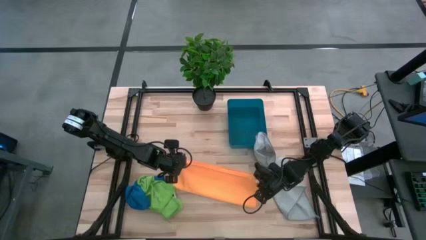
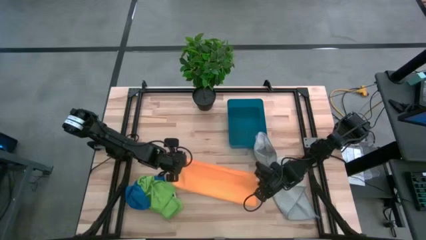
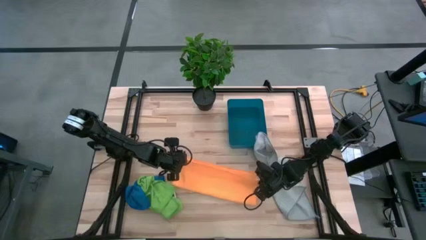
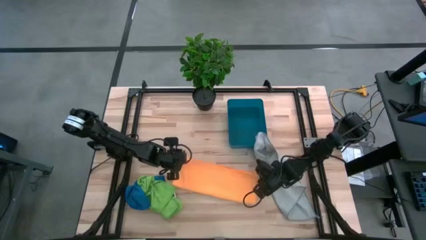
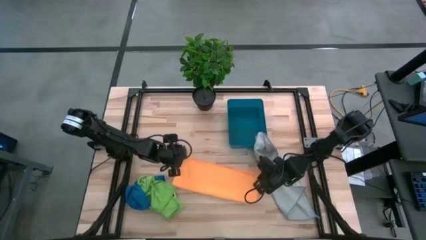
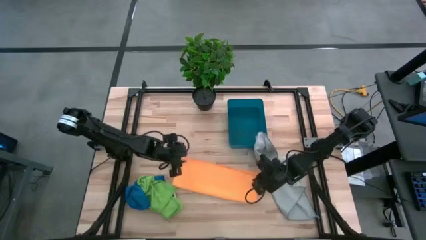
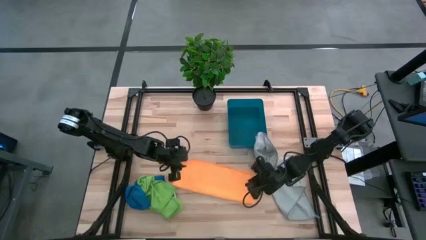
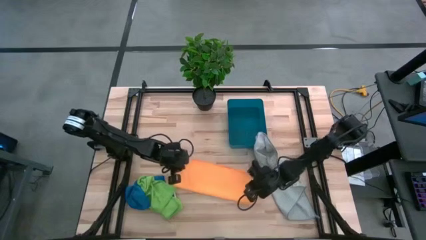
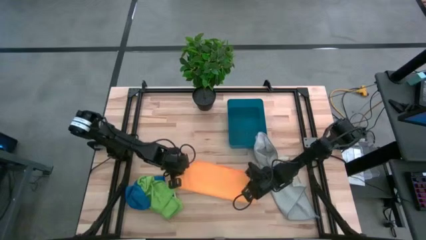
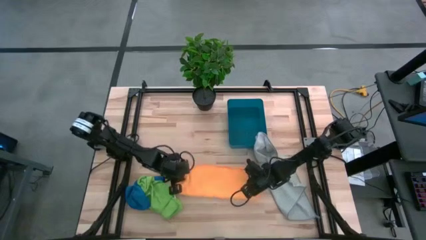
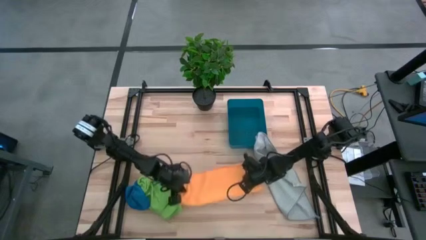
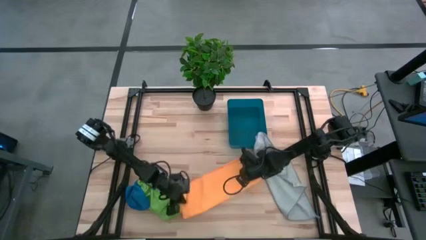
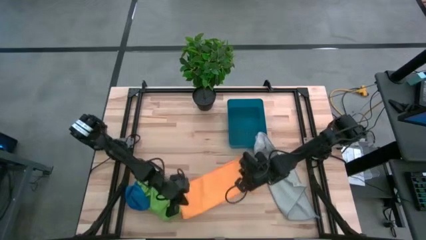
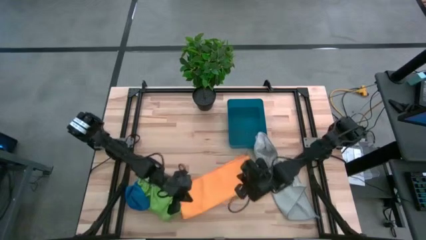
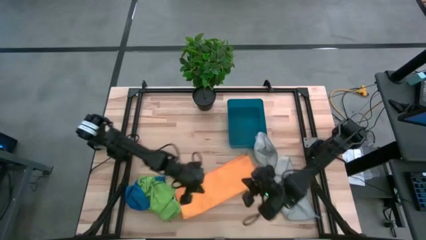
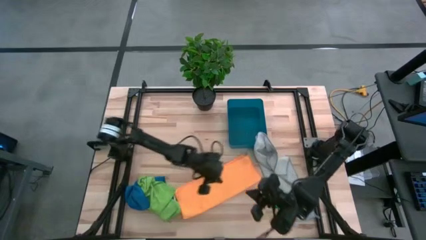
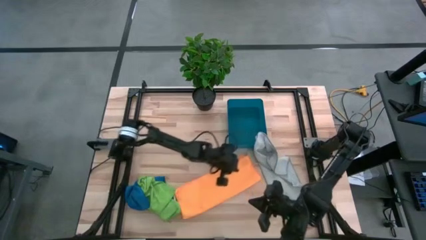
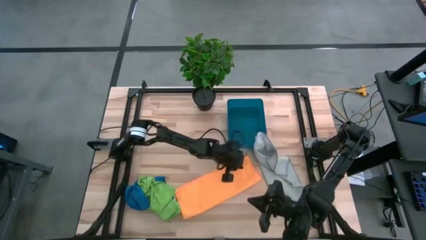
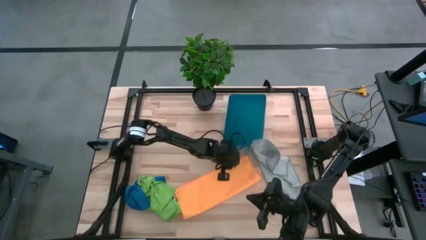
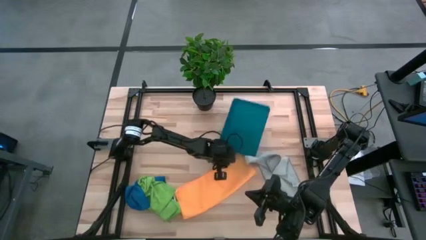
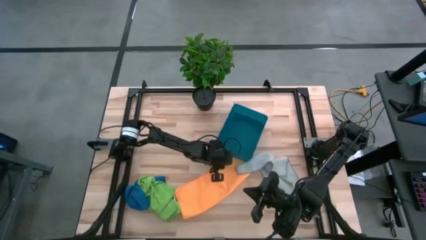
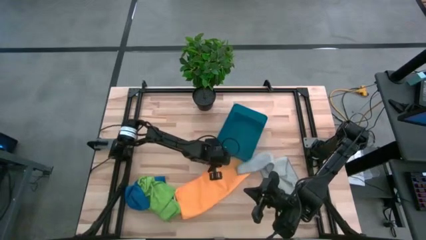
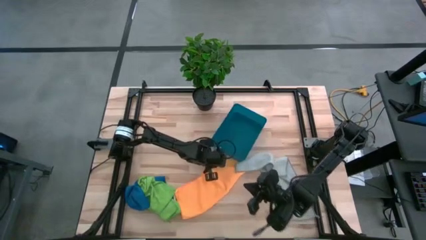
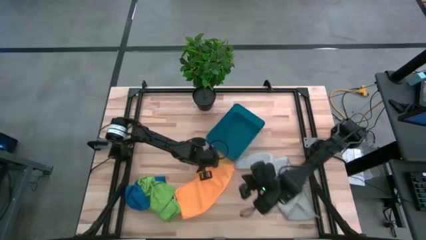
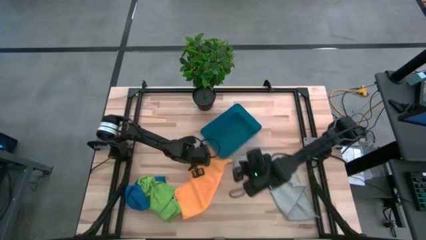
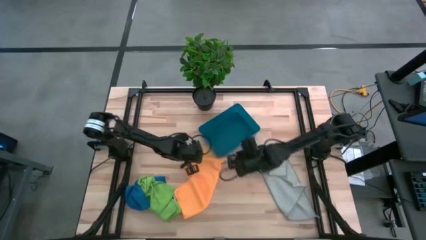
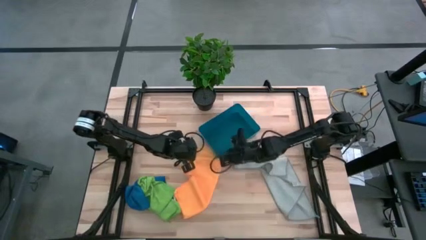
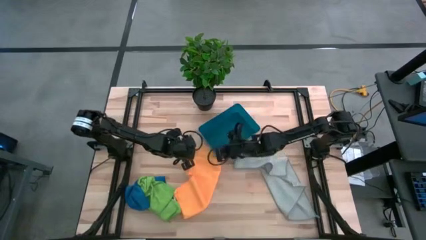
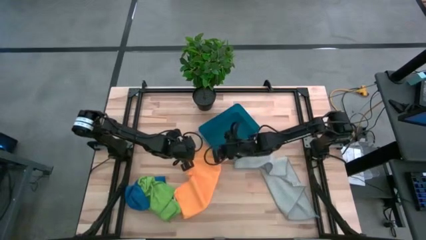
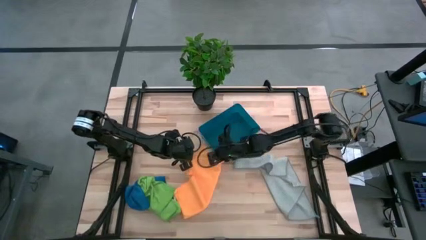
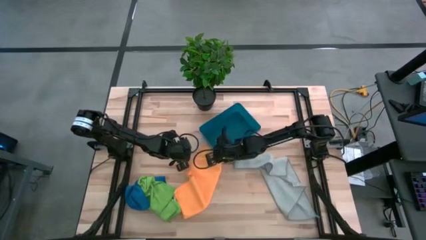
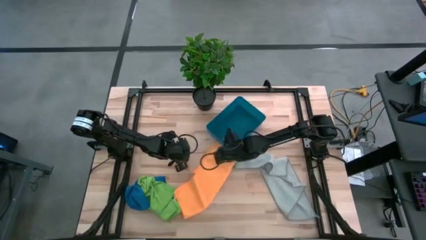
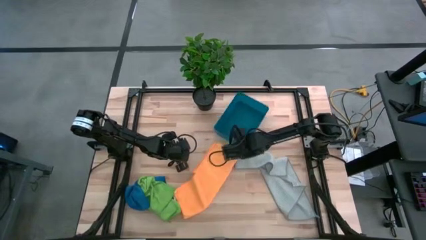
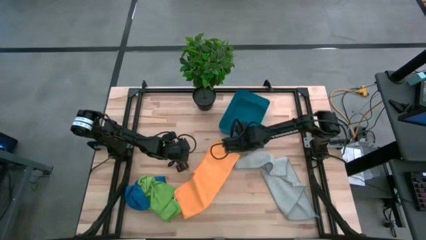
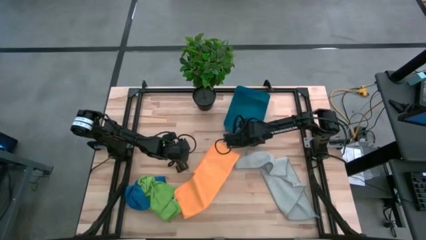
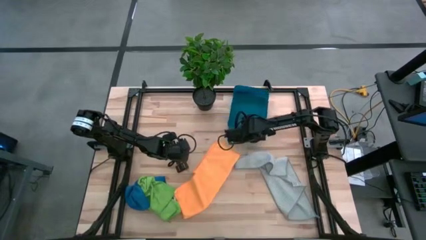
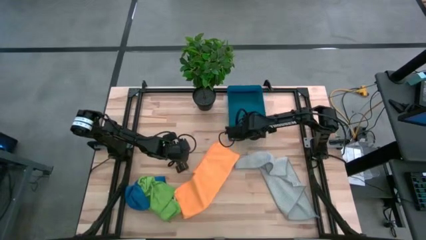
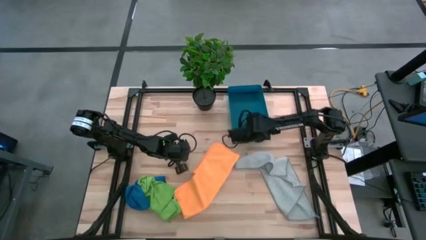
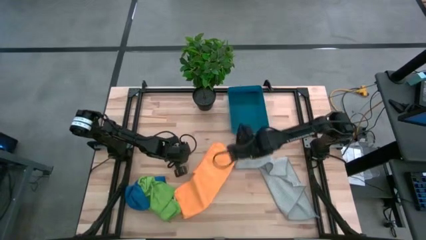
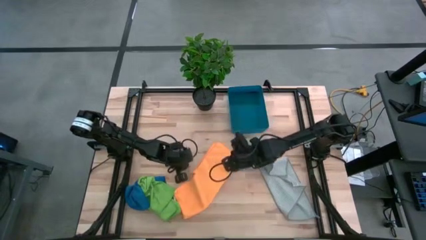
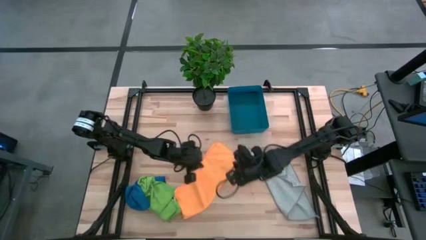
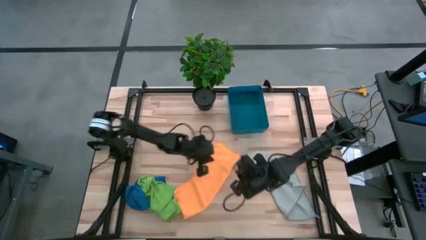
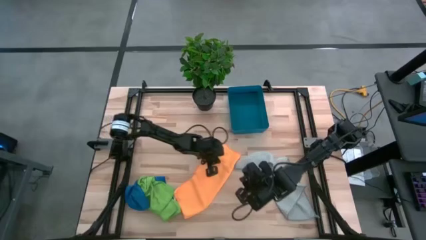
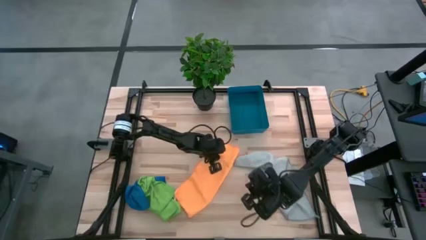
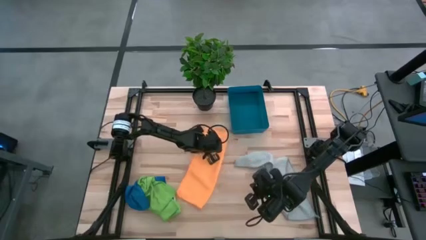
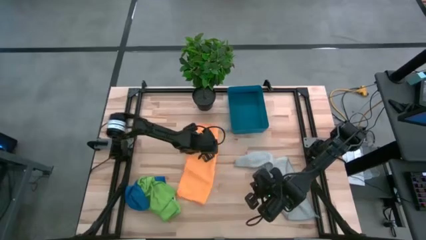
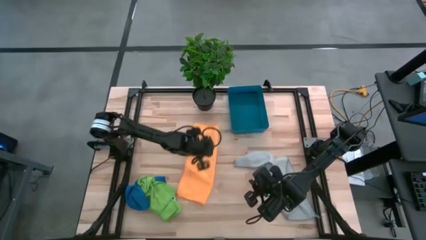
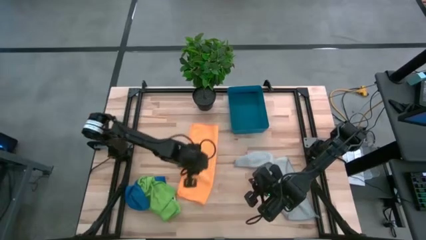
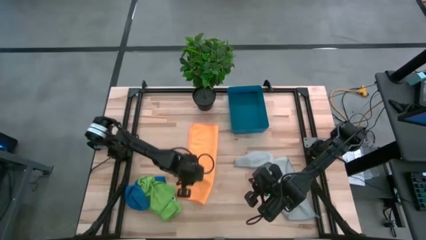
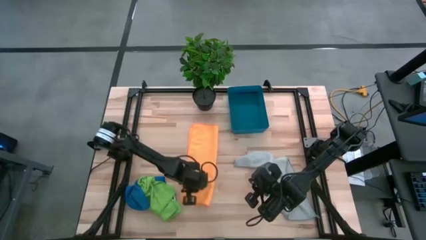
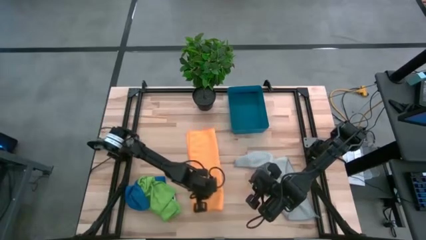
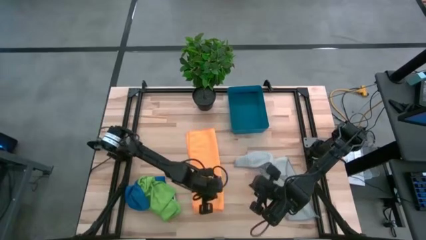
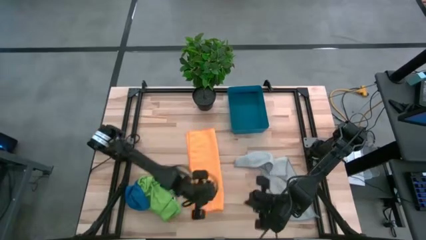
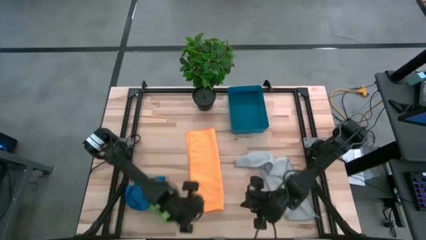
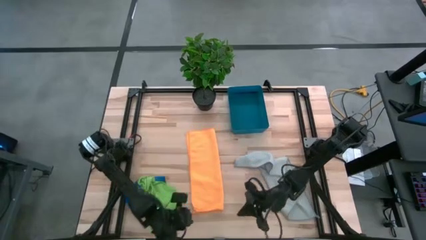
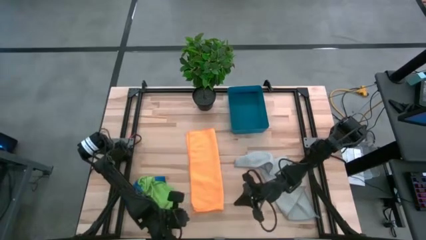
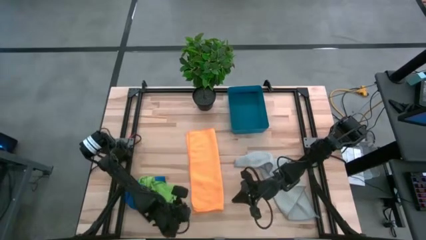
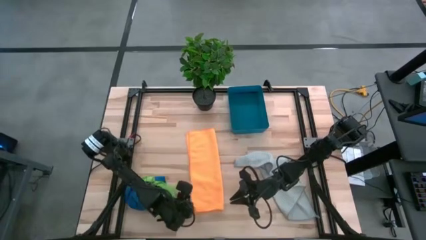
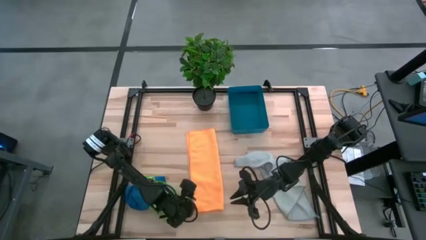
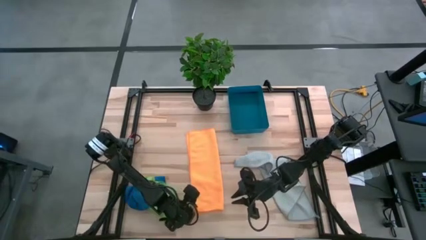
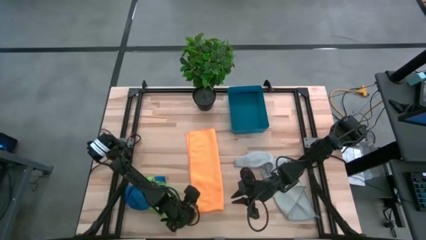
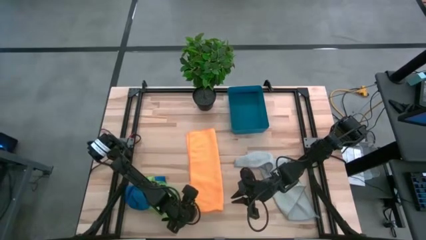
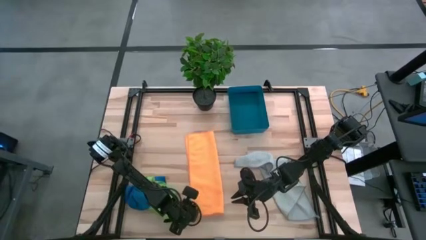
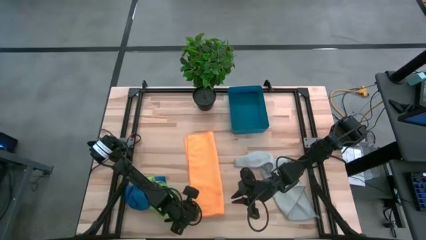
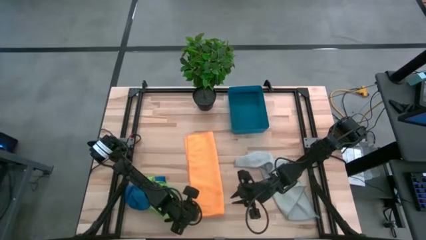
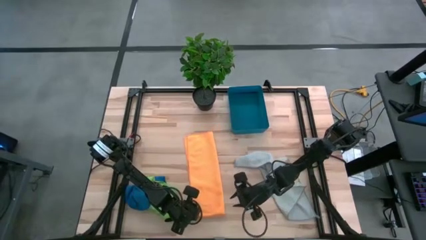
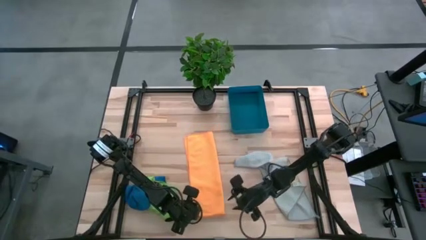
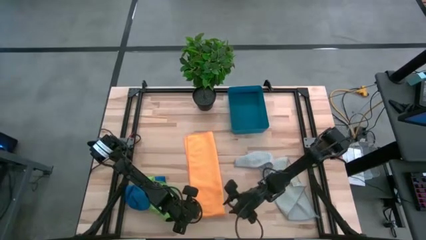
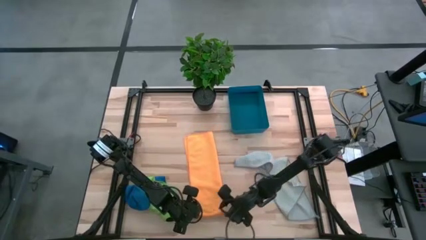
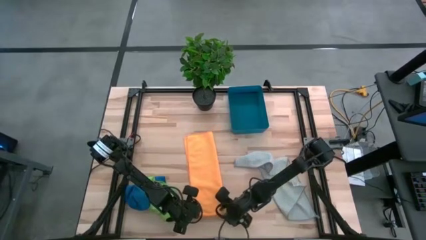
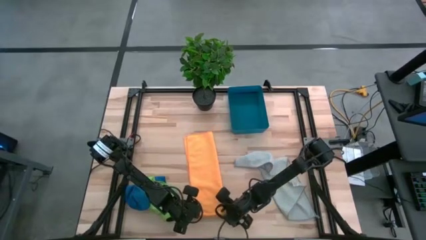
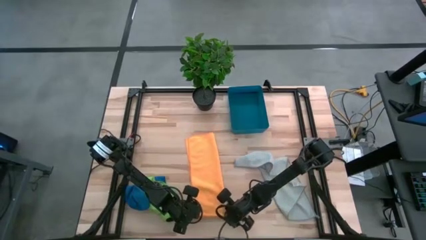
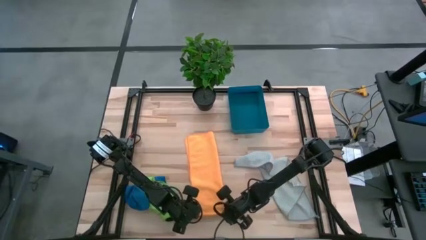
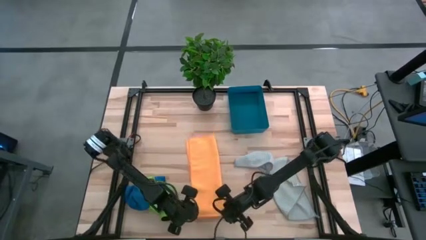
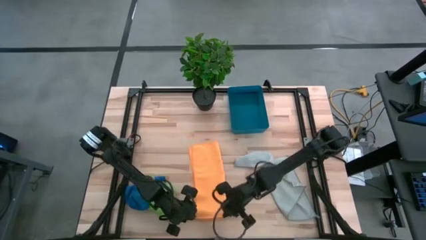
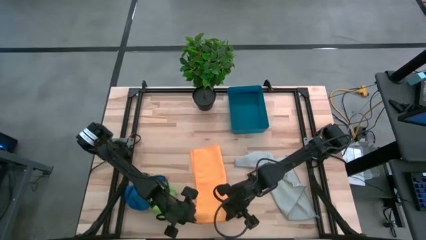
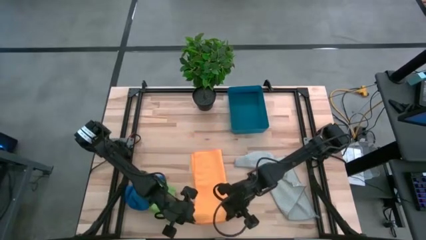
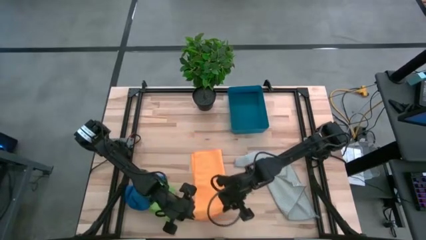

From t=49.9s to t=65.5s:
Task: Fold microfiber towels
Fold the orange microfiber towel

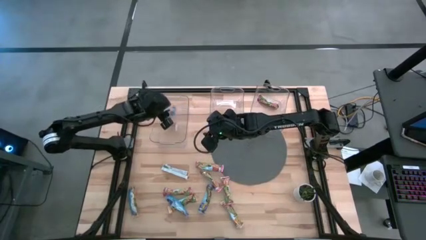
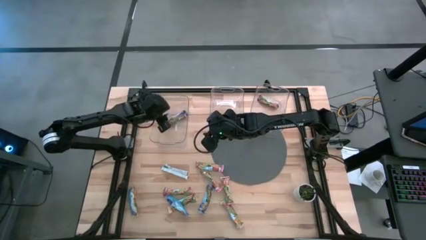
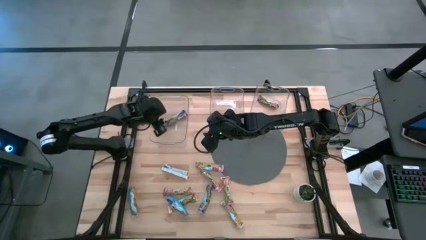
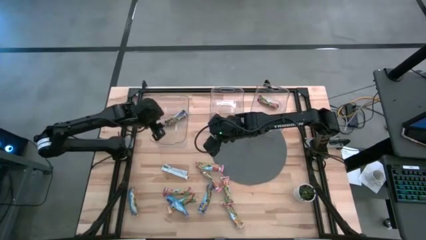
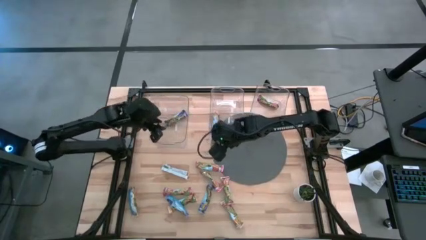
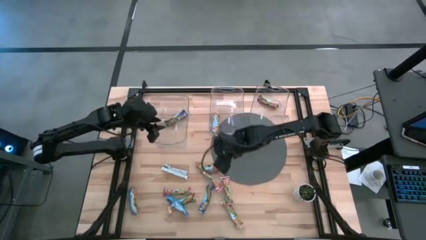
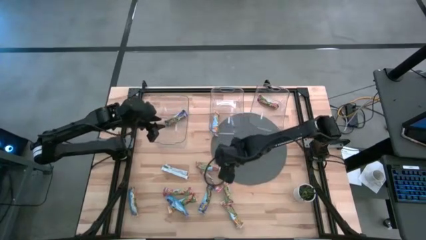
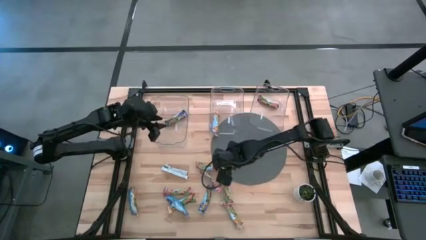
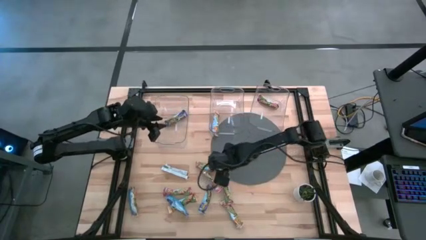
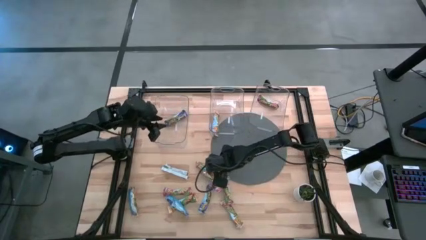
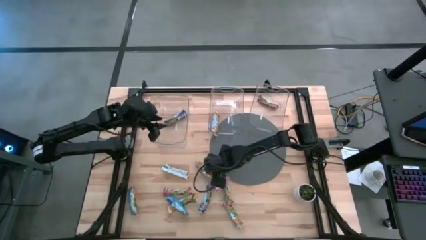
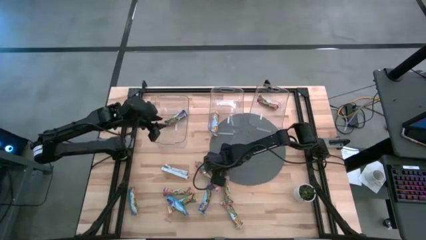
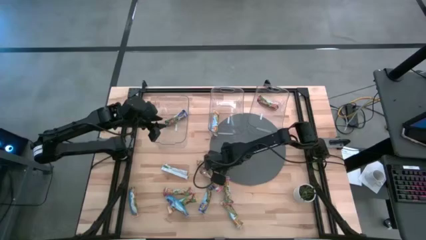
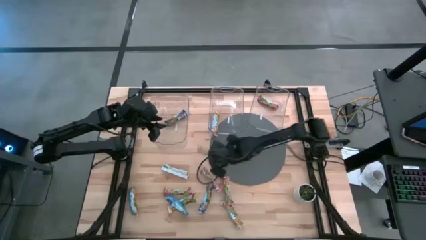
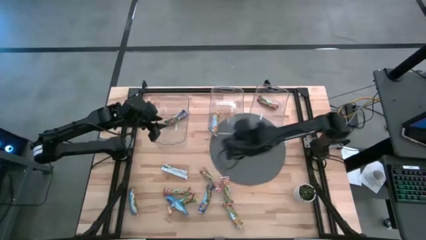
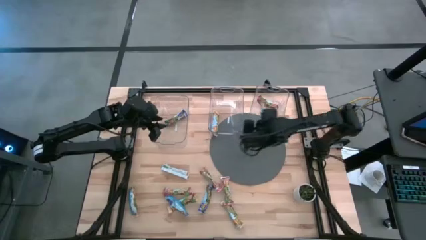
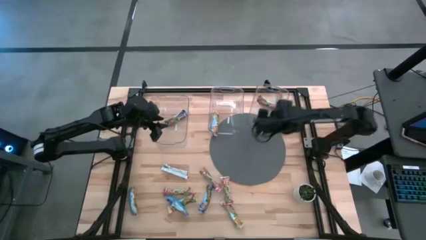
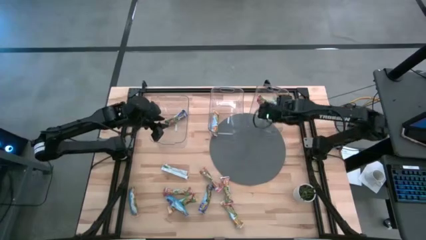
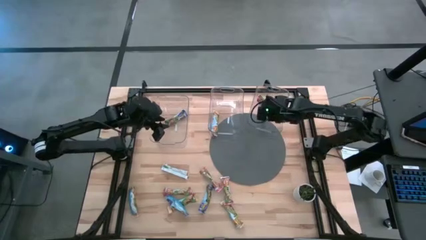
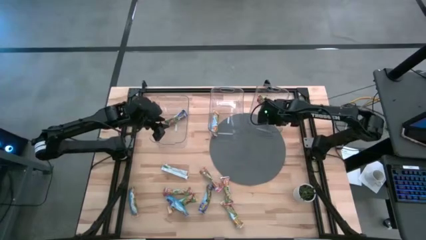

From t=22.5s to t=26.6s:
Task: Pick and place Granola Bars by type
Put the red granola bar into the right transparent bin
